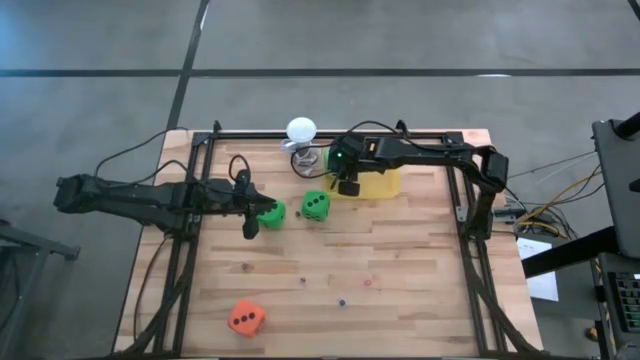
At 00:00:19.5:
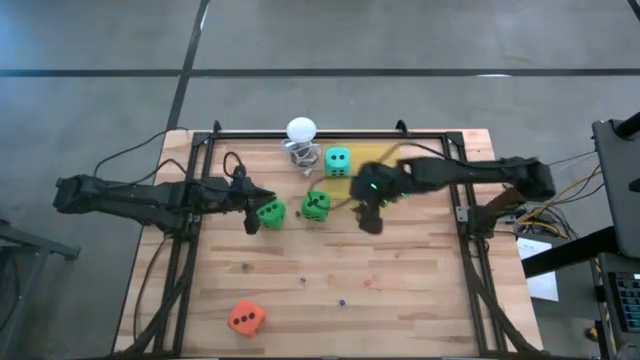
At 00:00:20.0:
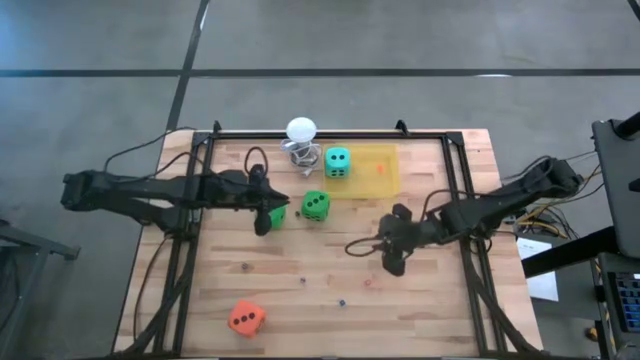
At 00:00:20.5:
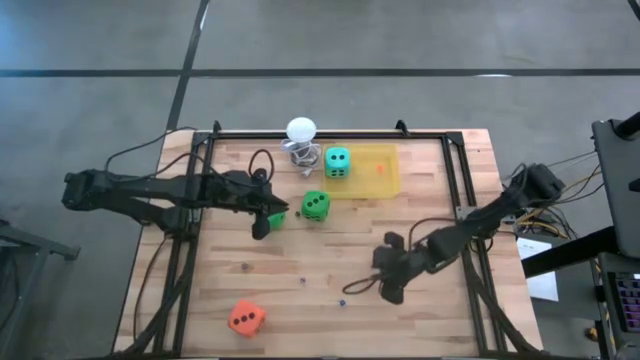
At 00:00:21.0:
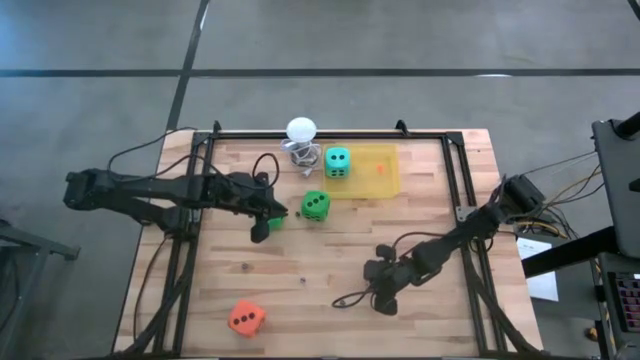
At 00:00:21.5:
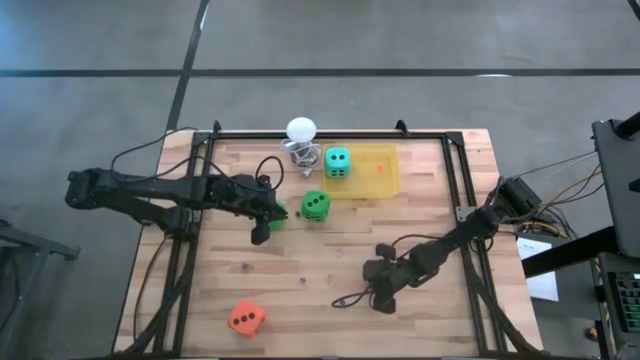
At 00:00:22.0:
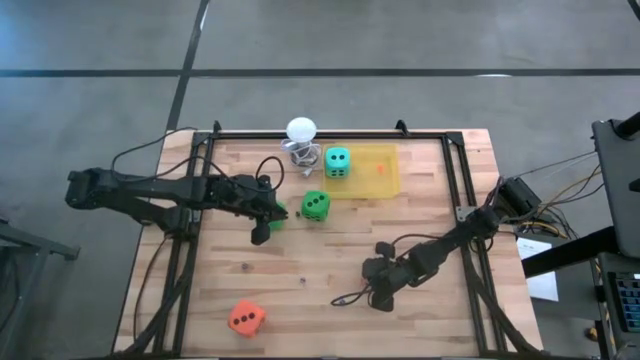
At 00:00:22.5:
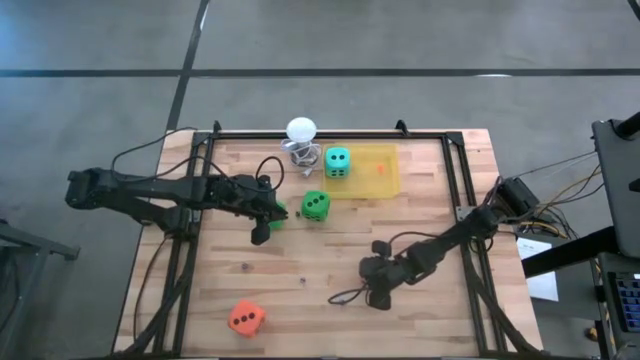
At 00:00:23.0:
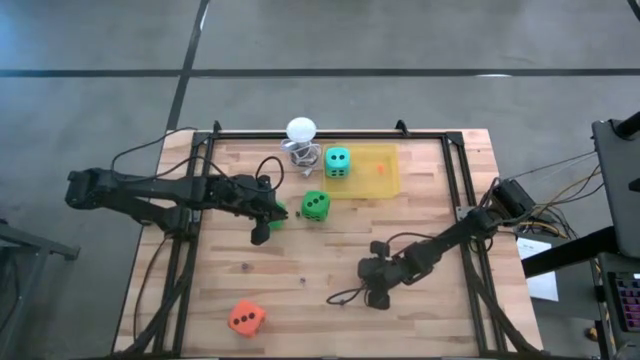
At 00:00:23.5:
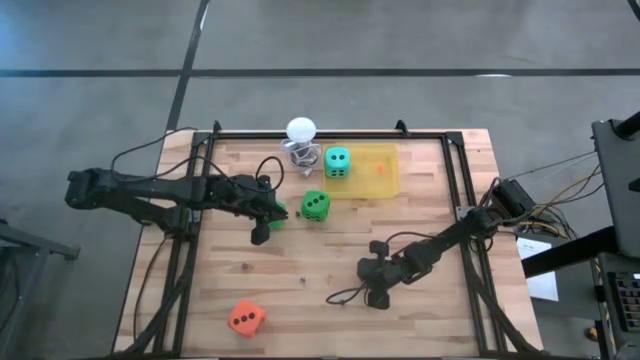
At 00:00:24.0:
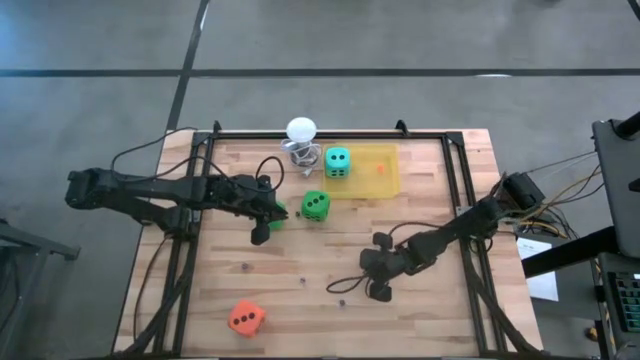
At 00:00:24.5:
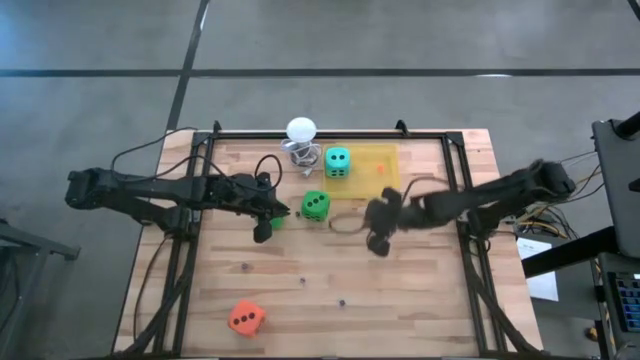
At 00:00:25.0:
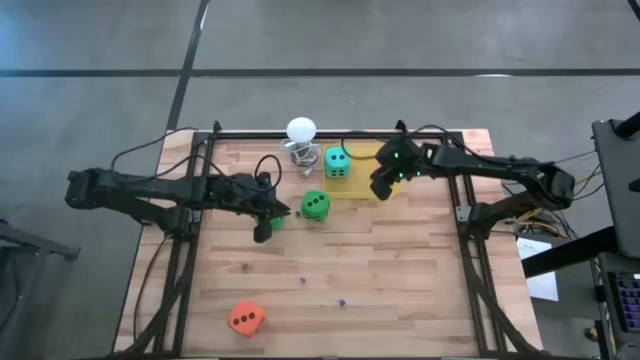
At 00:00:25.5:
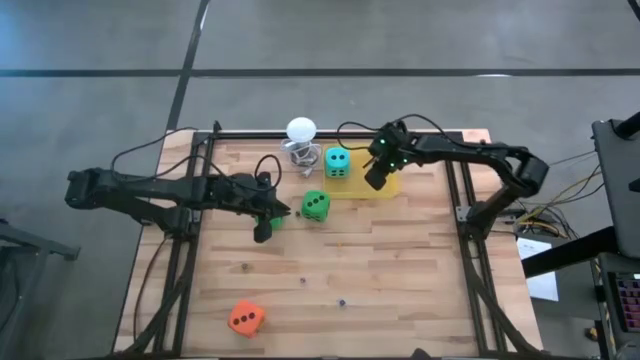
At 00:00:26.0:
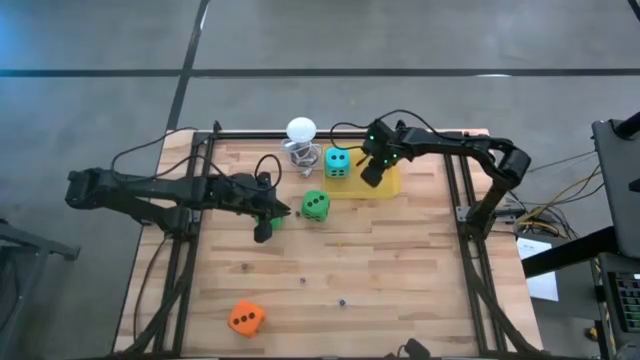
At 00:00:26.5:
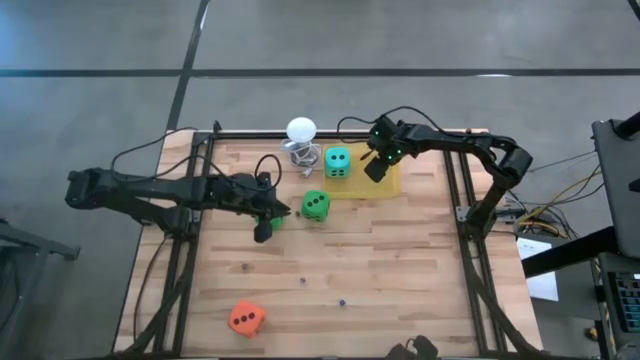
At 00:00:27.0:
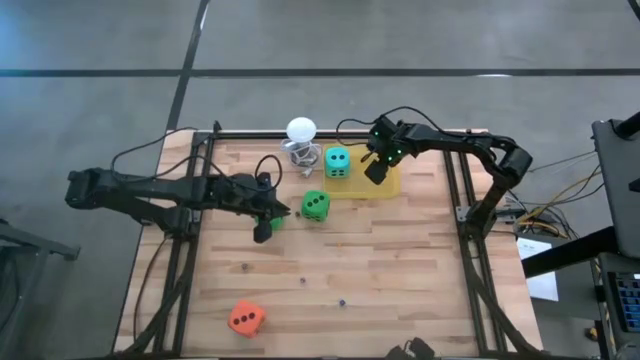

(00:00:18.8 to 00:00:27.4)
Task: Pick & Place Dice
Put the small red dice into the yellow bin

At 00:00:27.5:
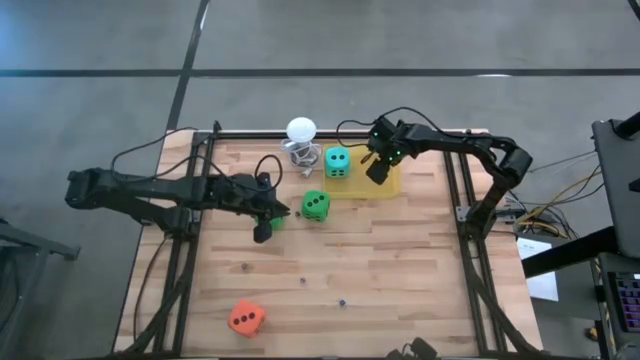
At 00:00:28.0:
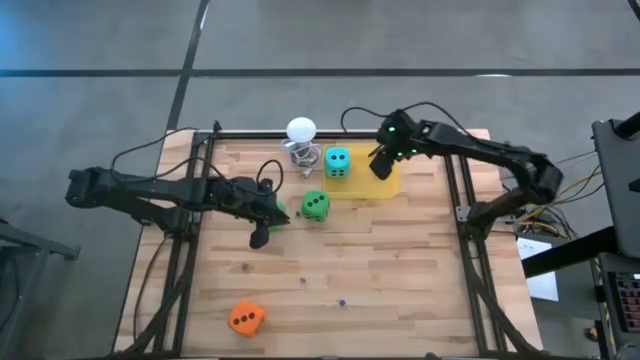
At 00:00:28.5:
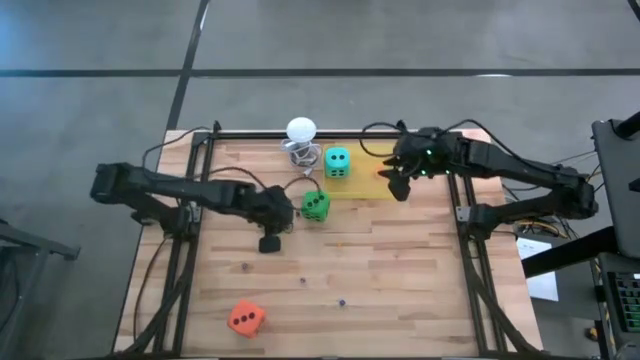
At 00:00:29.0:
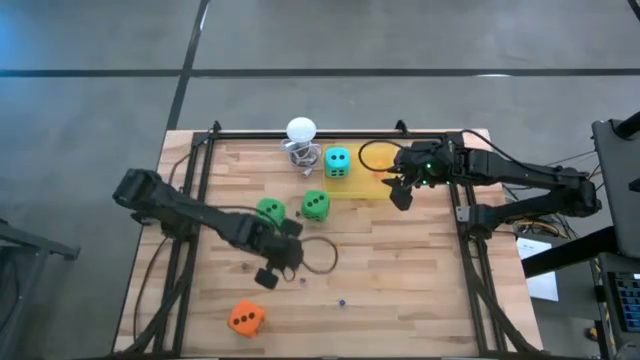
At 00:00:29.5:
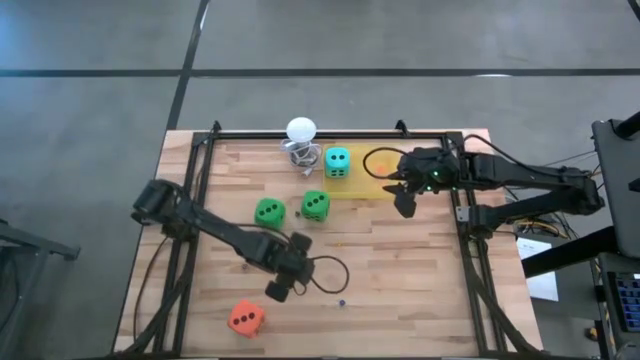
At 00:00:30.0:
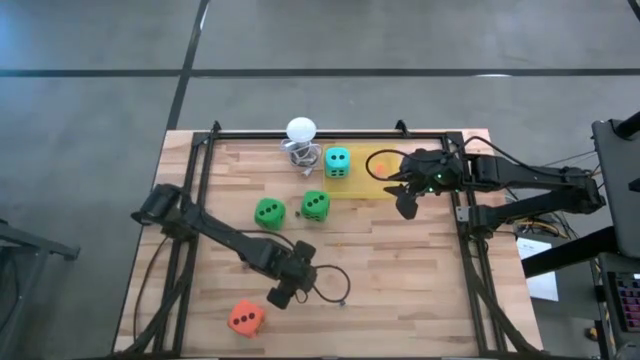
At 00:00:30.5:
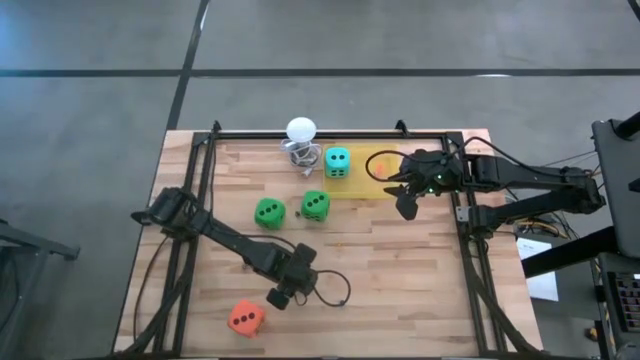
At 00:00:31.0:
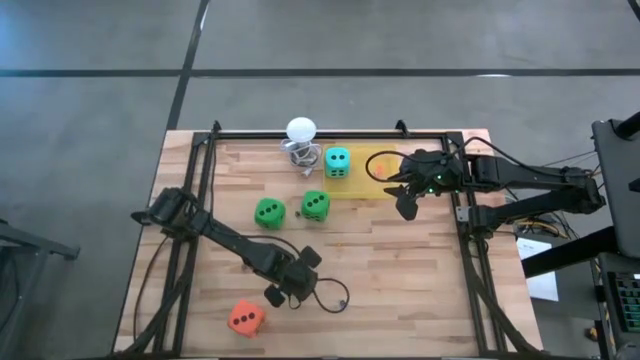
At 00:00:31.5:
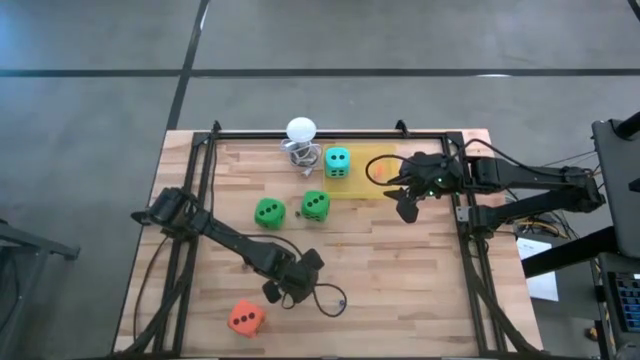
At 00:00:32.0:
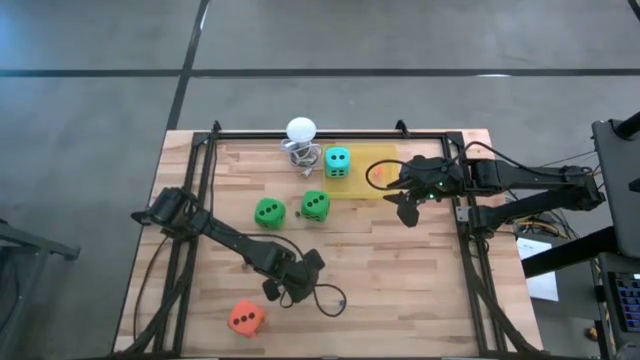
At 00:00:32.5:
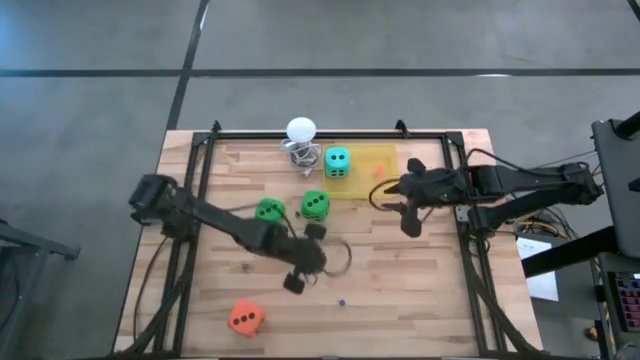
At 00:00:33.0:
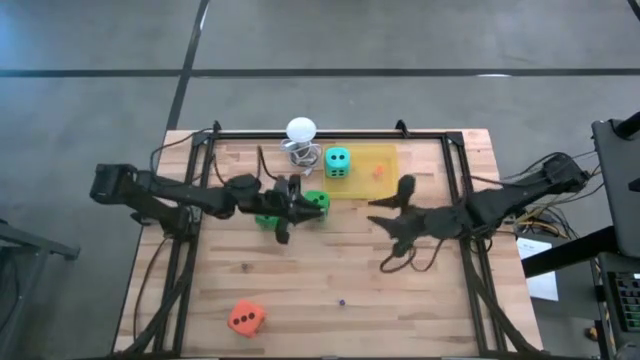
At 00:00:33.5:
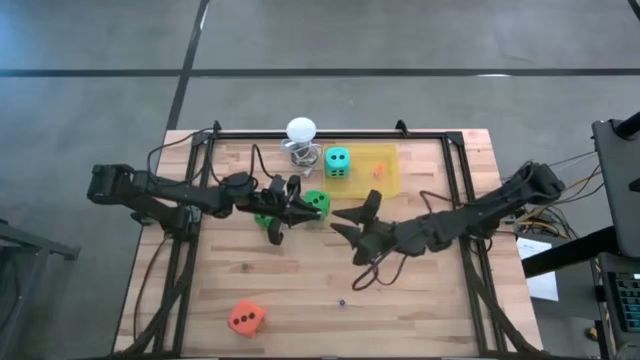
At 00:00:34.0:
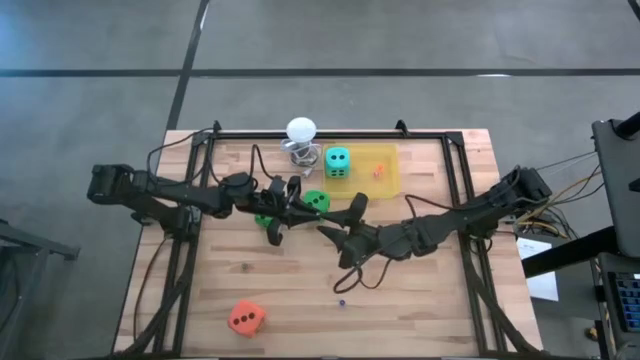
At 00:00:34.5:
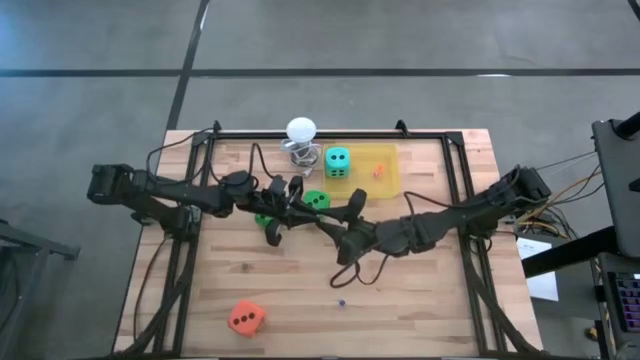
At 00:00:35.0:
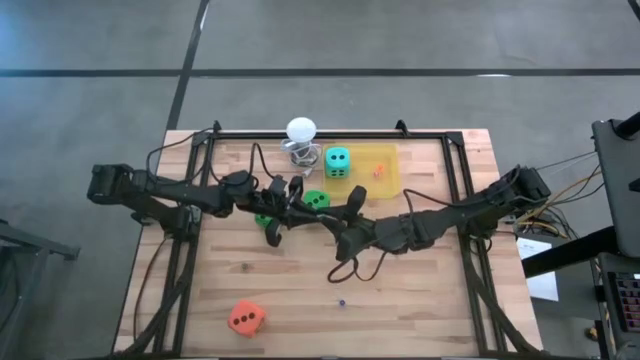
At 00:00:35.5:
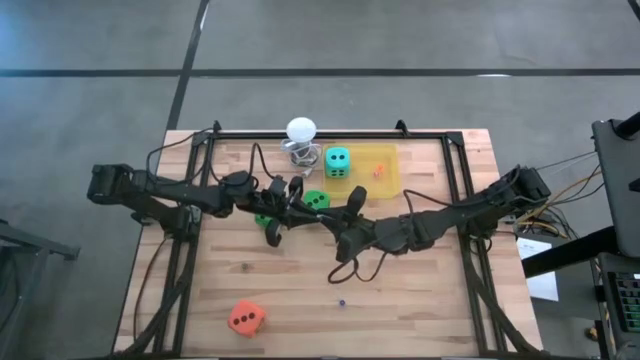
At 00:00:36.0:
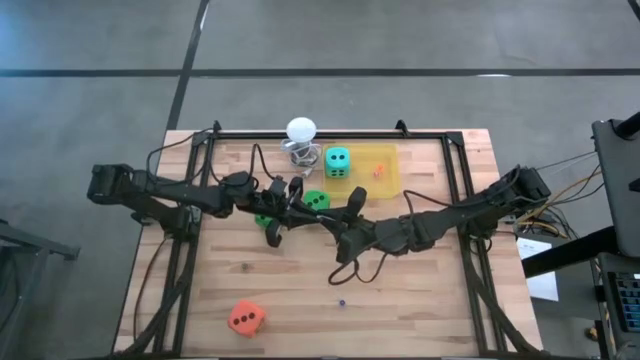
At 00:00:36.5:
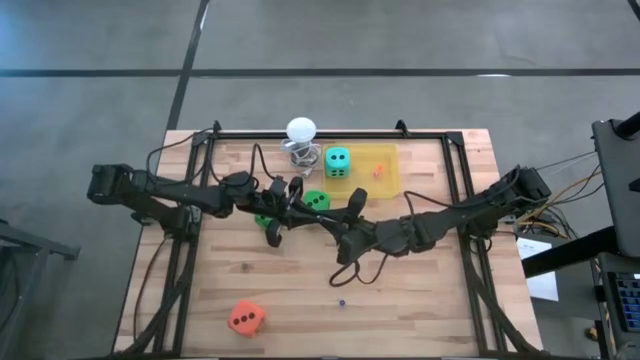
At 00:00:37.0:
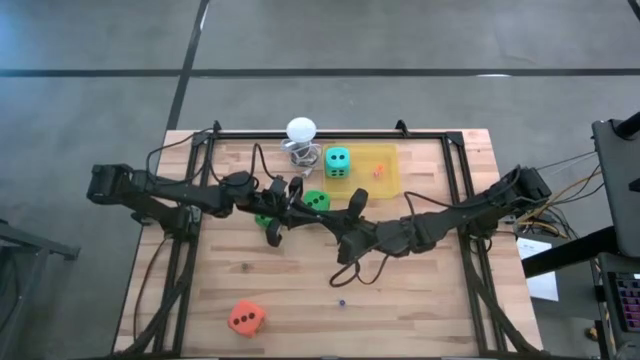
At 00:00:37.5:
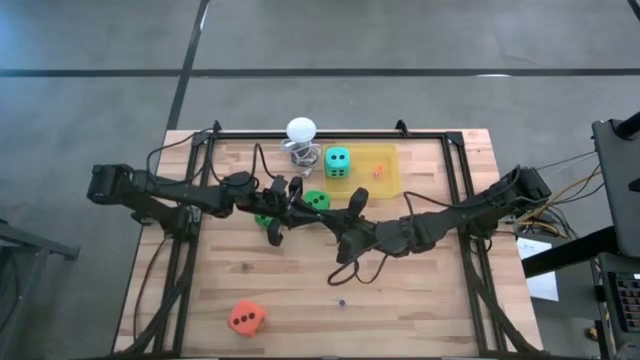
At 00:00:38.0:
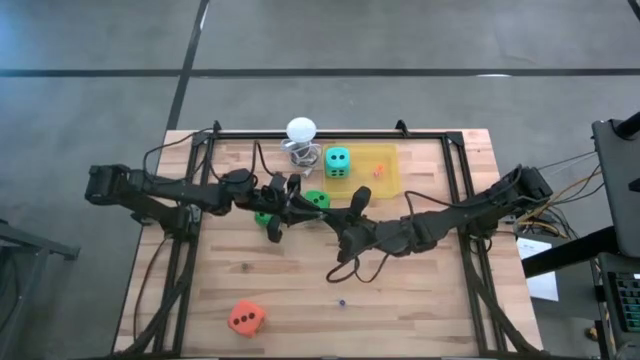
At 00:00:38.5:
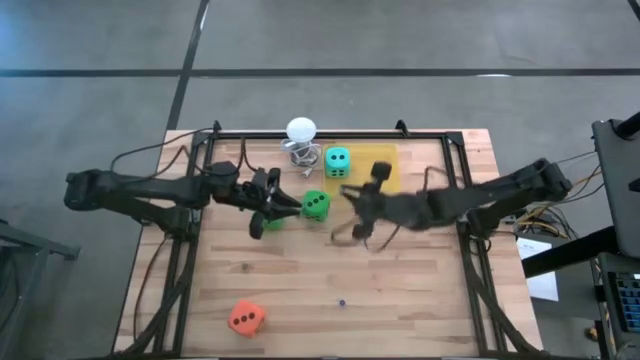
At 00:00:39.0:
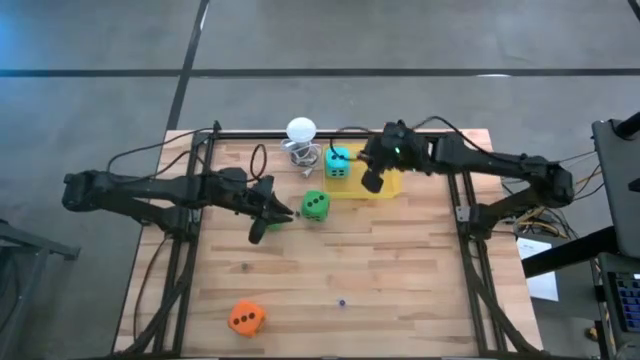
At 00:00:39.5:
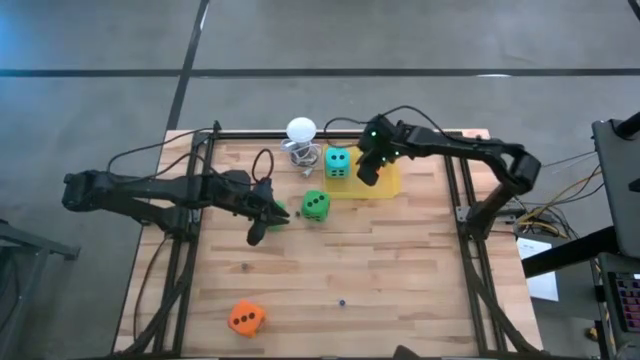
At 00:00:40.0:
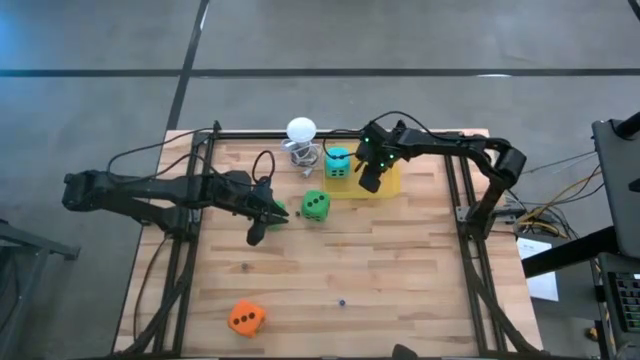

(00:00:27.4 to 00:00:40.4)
Put the small violet dice into the yellow bin
